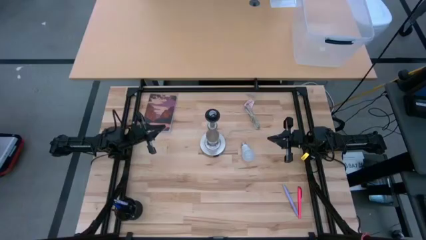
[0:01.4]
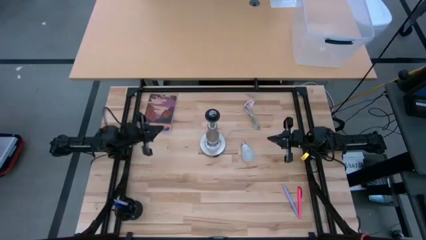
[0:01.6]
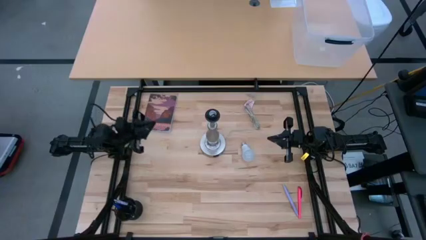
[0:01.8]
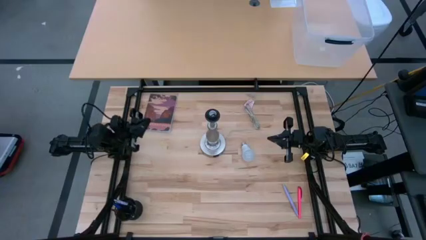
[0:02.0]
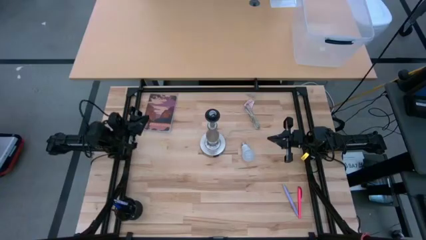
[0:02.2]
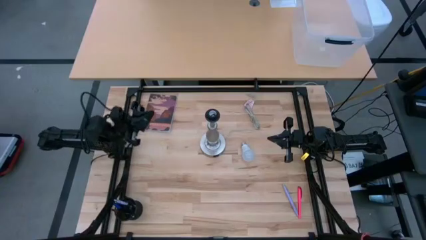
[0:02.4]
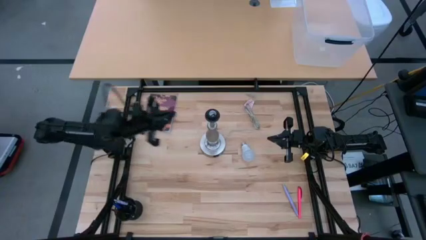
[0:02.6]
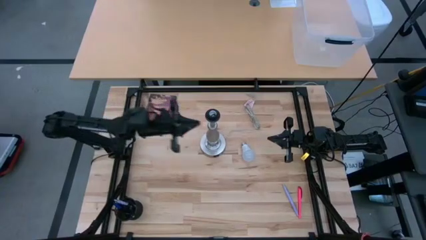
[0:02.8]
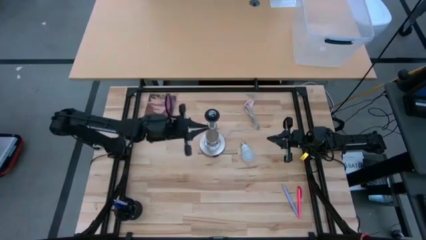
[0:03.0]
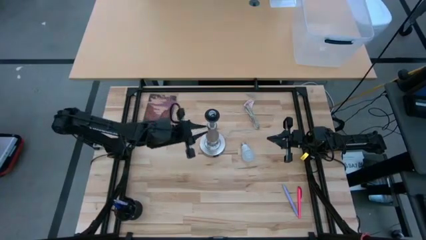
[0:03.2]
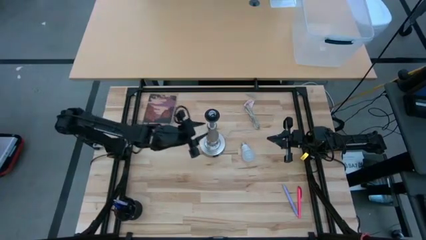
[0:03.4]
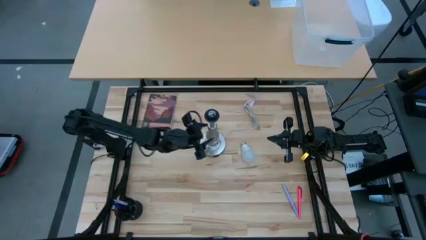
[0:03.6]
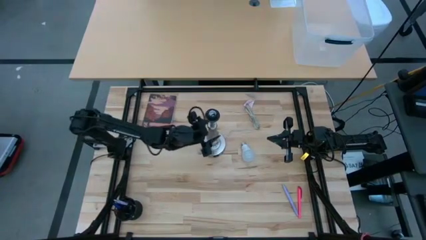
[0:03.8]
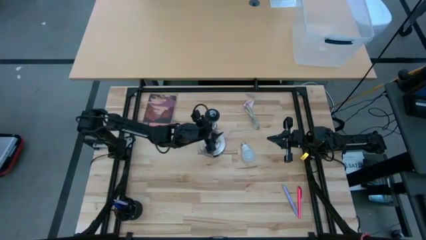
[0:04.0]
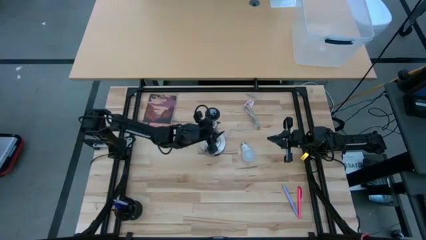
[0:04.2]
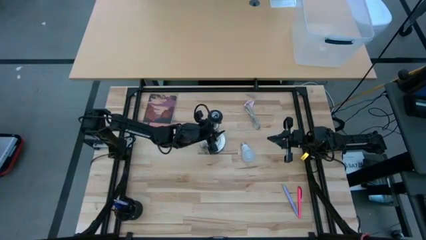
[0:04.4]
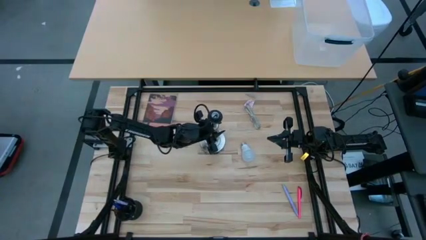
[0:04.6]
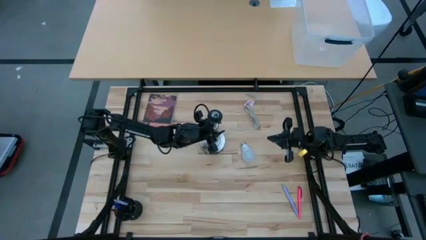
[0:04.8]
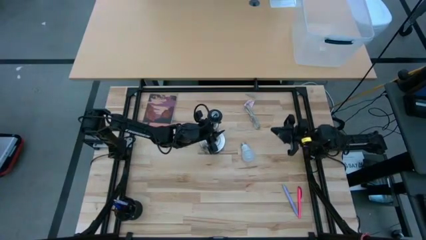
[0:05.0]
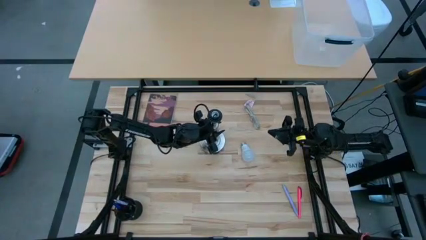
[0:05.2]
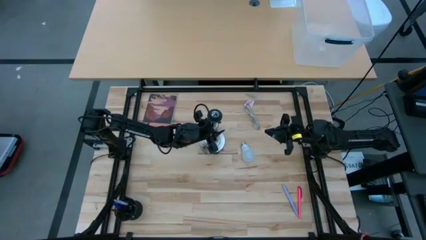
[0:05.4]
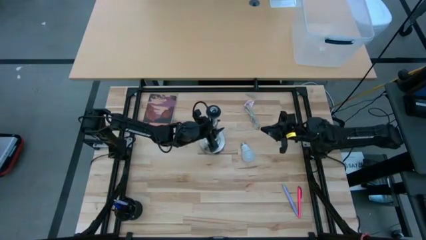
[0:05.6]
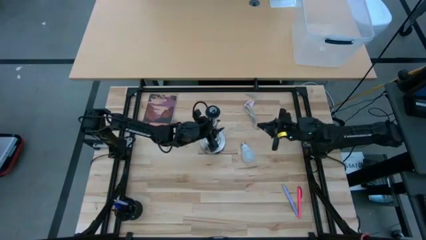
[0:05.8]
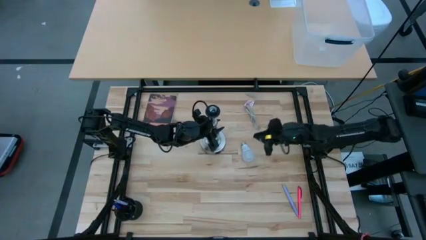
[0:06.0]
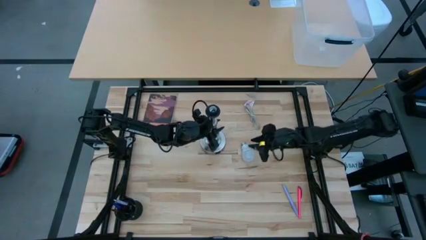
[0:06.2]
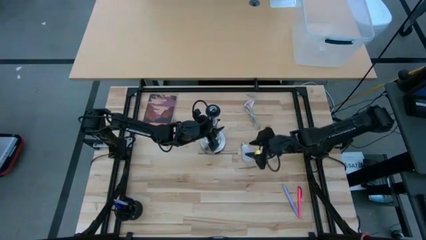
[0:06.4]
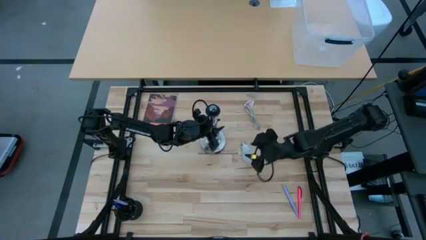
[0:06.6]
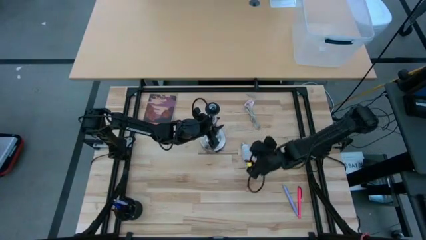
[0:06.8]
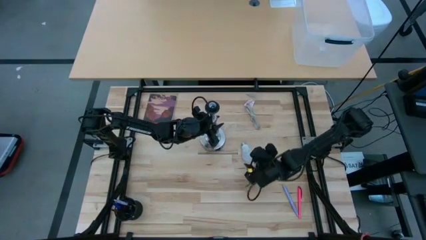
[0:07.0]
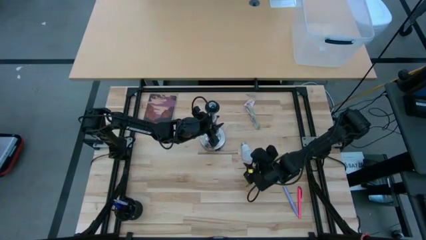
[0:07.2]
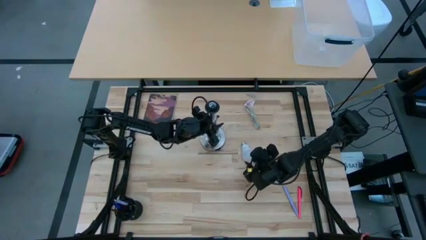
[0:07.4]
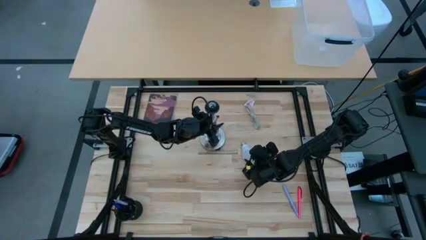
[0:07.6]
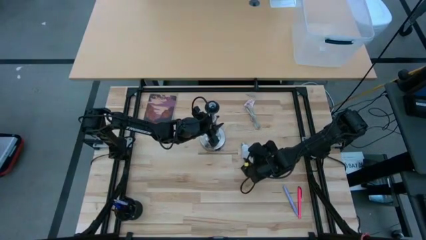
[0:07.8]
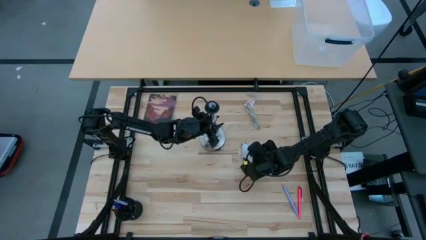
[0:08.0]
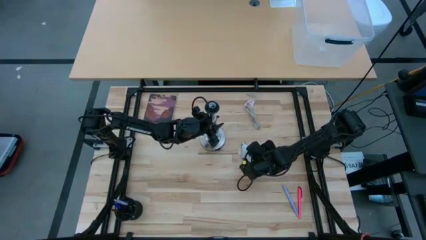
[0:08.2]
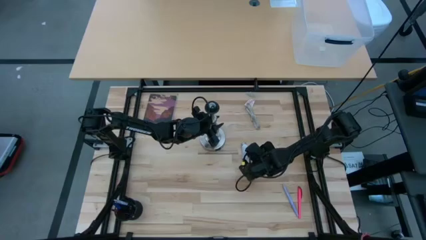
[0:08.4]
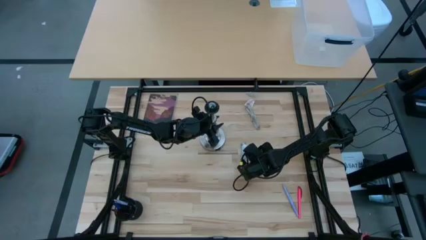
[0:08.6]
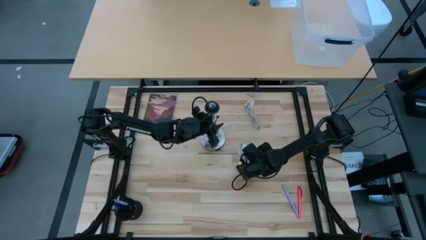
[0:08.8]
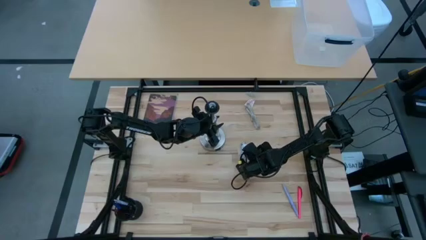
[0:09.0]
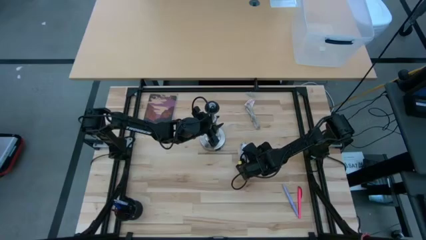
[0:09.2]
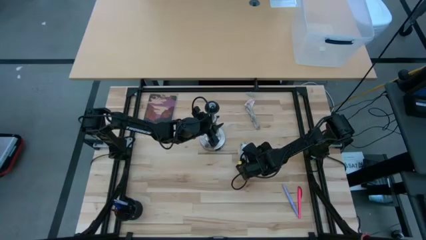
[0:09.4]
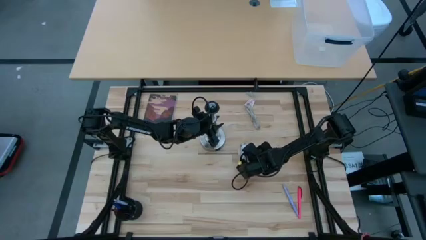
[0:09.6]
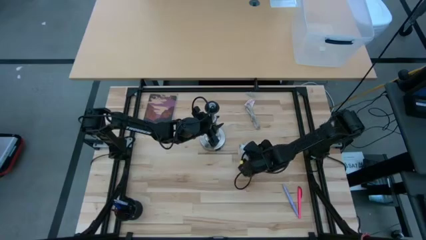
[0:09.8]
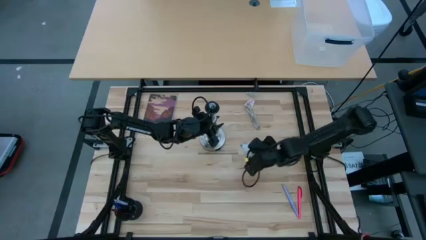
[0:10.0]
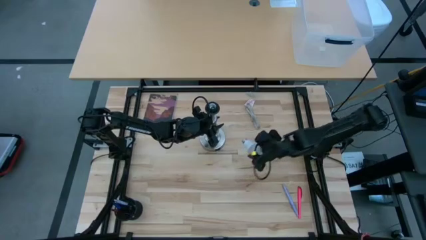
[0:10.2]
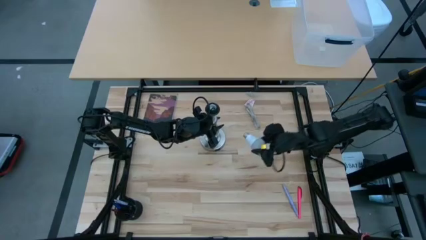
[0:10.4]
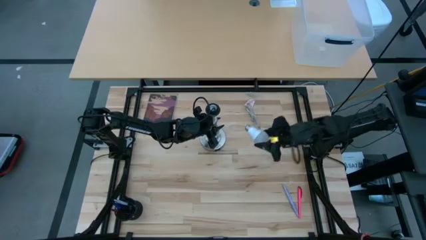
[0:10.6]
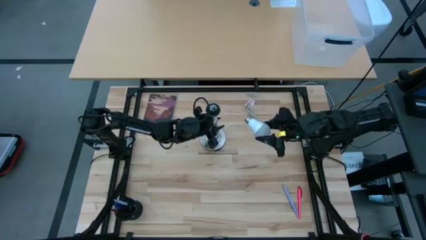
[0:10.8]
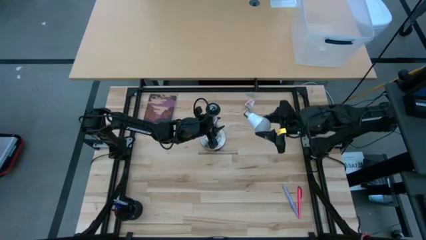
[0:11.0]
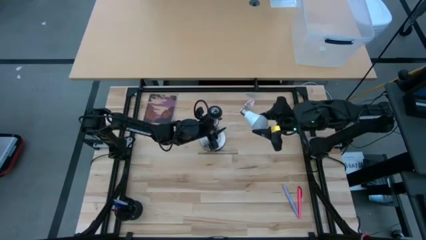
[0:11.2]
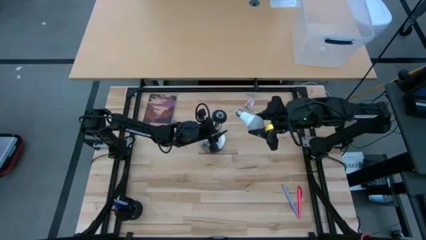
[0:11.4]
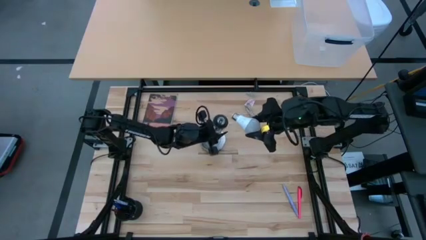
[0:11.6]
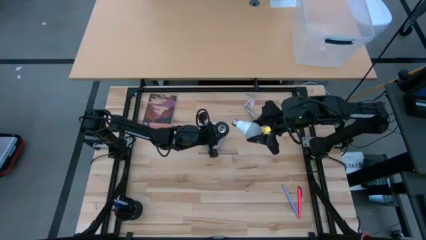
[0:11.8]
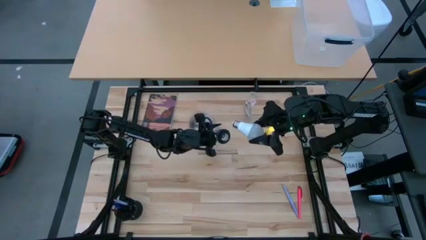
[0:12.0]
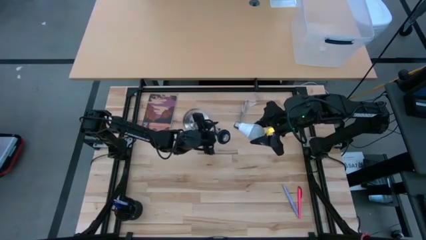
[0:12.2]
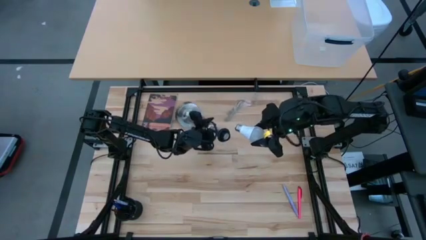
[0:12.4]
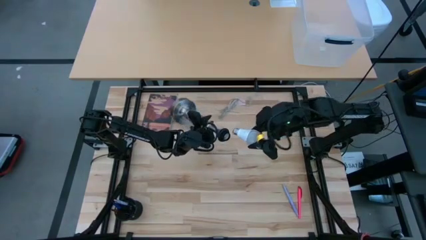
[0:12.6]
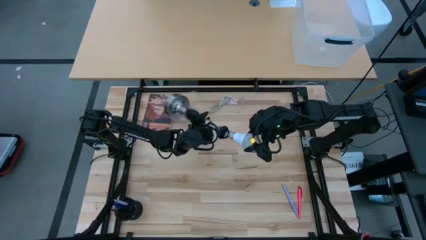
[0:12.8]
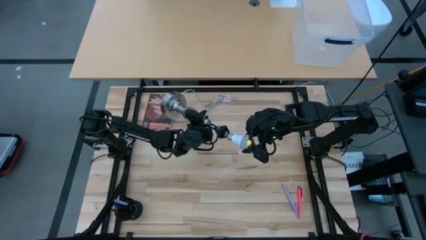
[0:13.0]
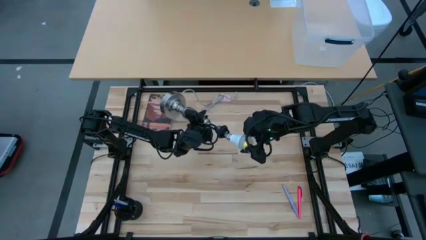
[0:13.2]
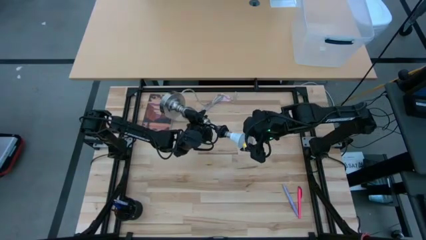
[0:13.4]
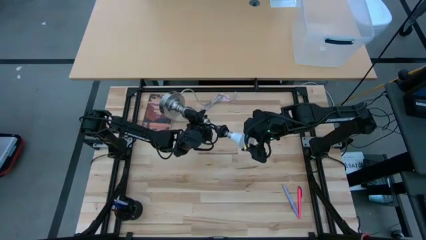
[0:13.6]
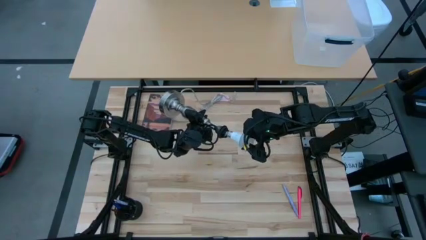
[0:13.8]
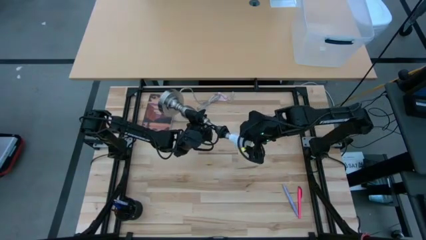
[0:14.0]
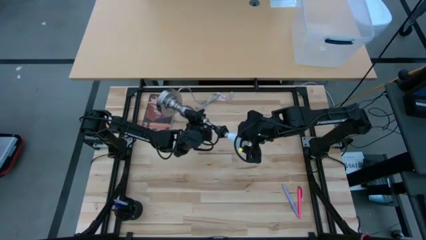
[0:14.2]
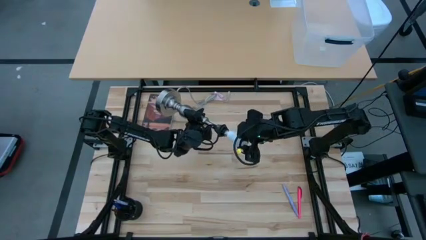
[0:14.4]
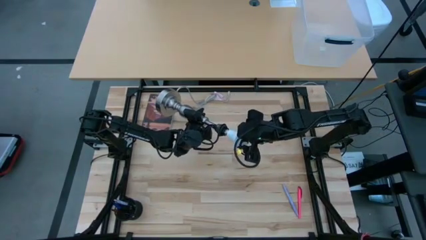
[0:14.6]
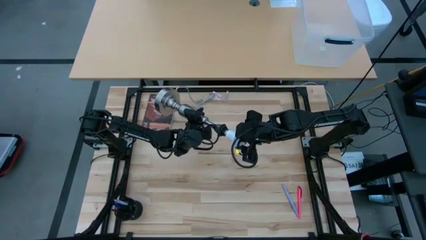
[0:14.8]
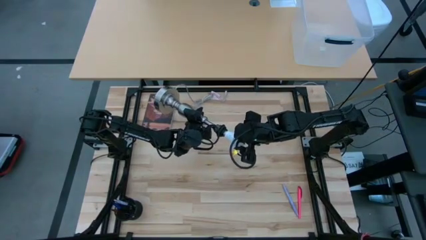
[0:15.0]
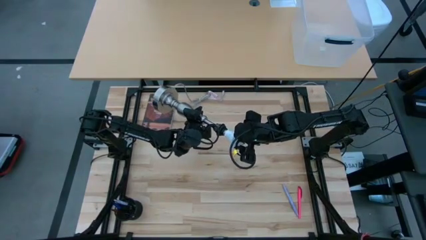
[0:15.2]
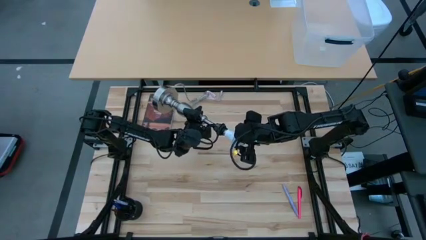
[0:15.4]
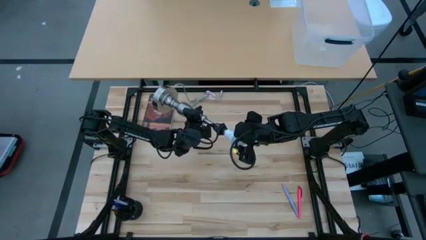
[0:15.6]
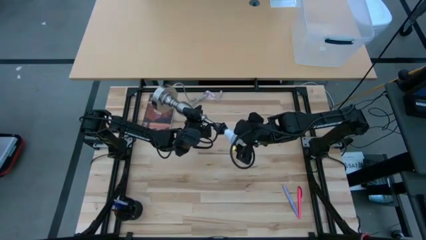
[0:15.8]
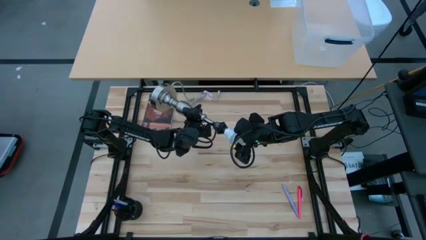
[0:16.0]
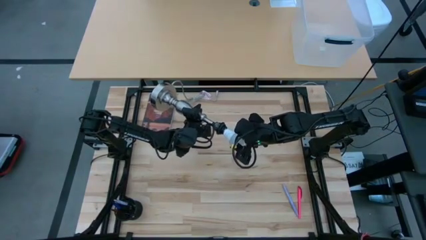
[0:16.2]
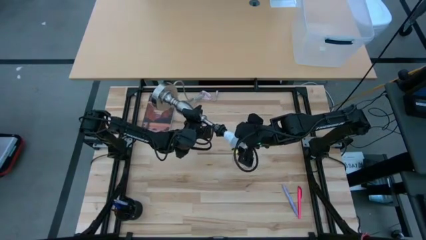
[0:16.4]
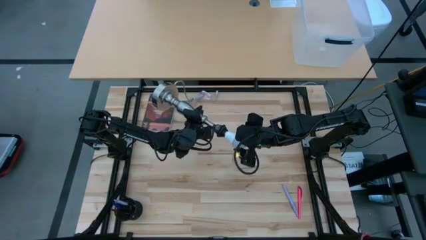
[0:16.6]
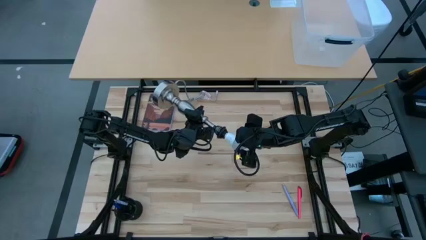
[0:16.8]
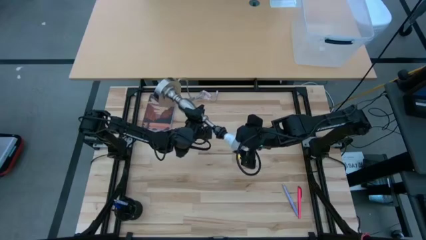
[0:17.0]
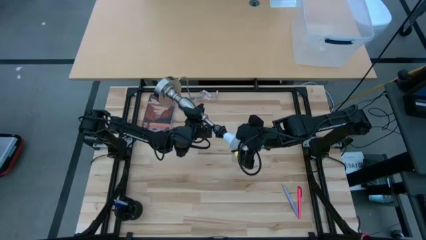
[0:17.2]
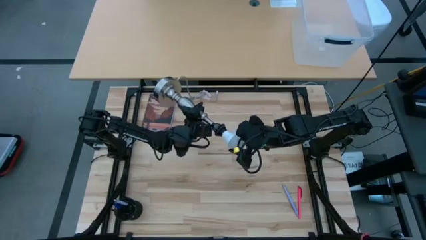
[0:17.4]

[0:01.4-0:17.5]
Task: Screw lightbulb
Insert the lightbulb into the lamp
